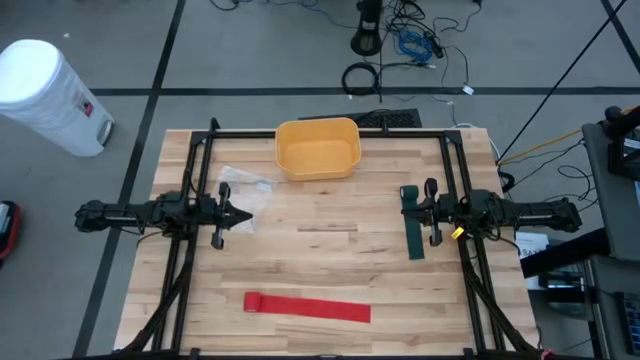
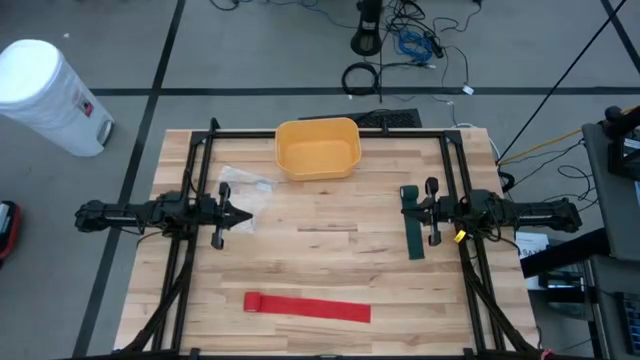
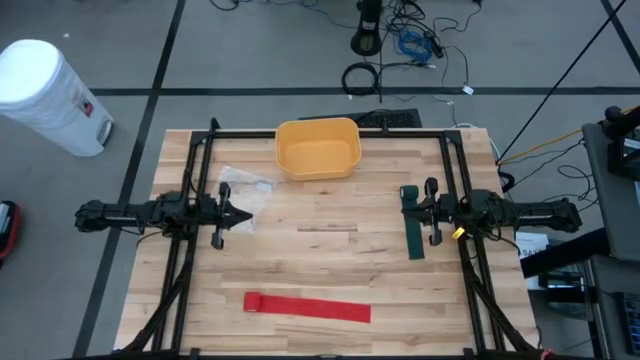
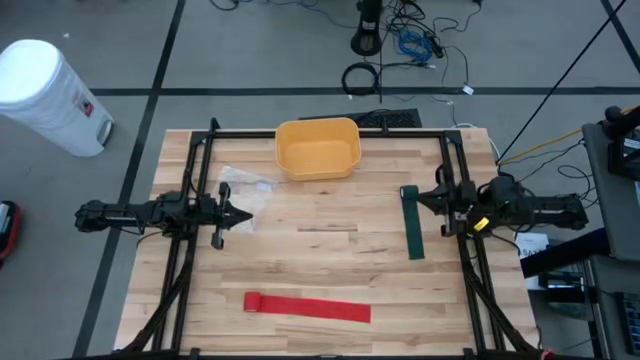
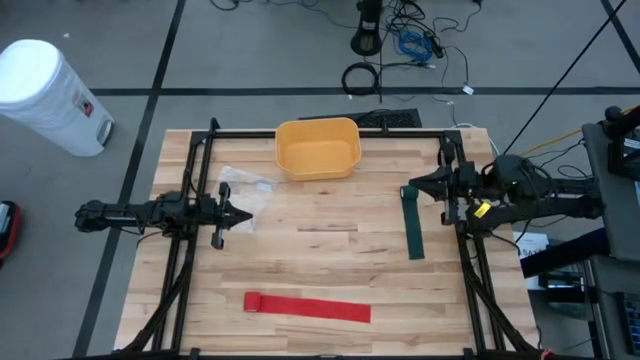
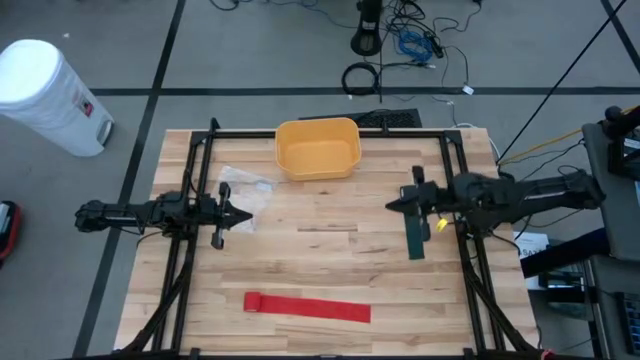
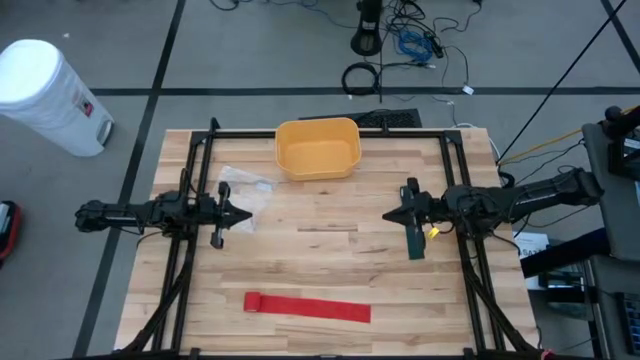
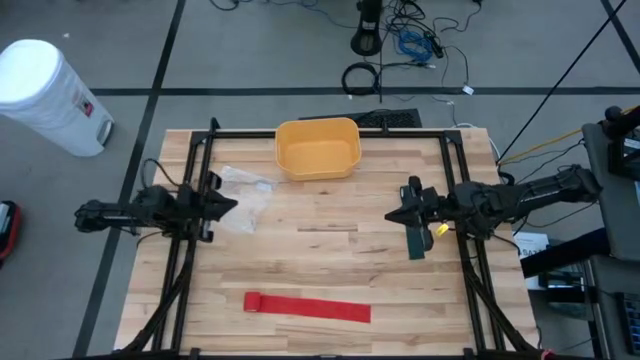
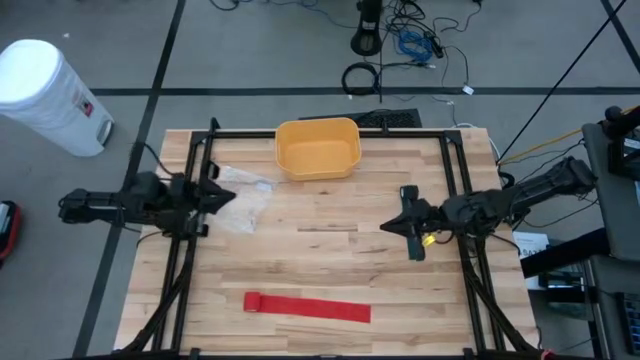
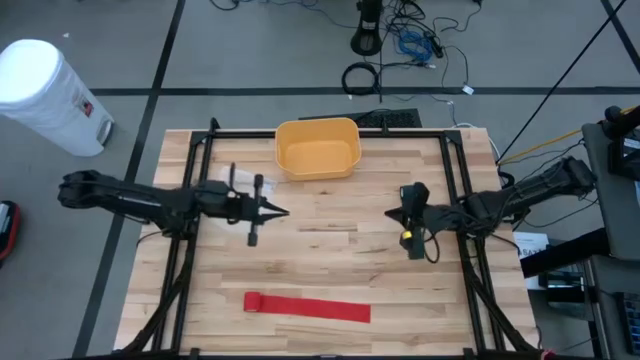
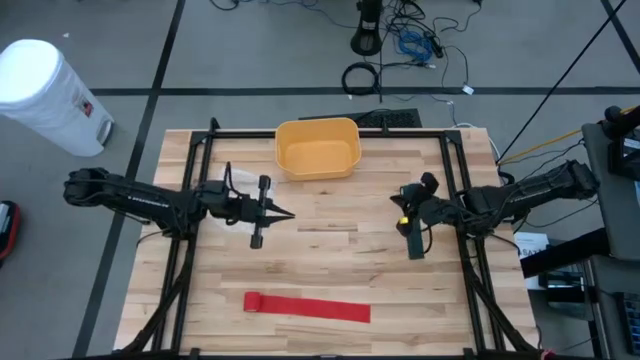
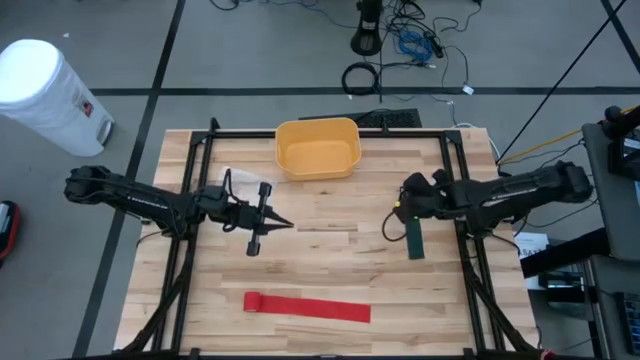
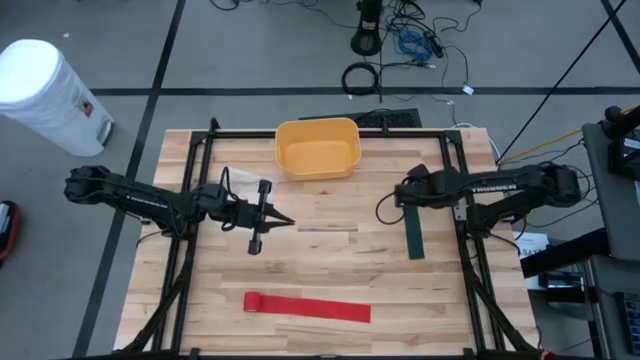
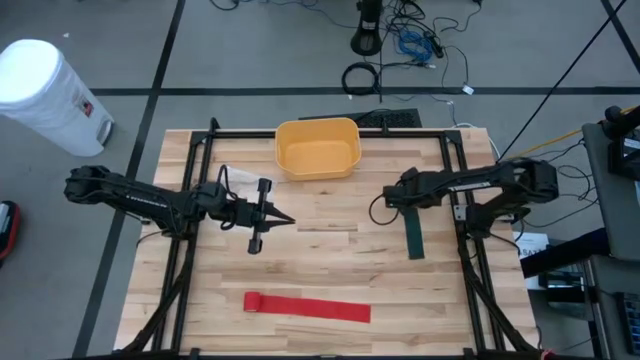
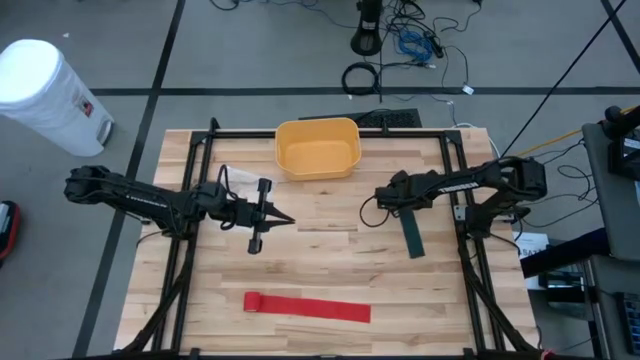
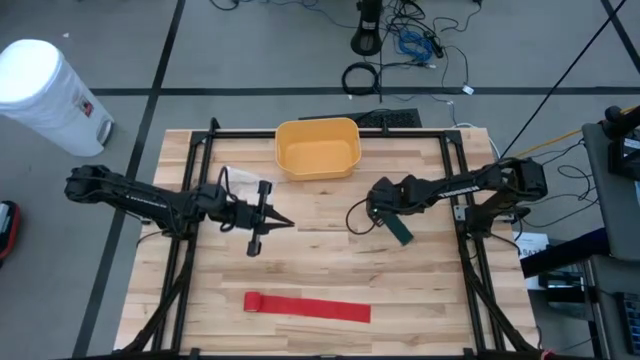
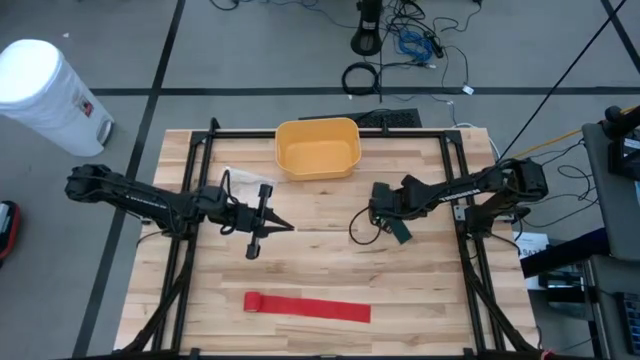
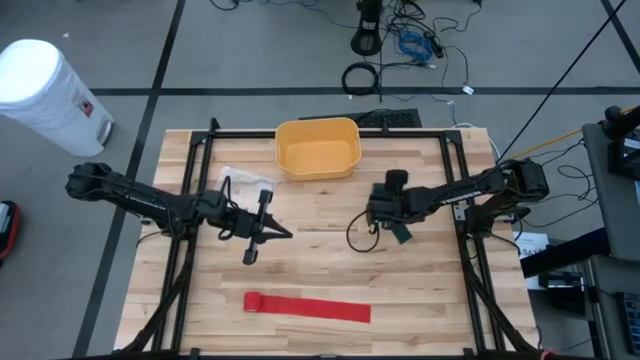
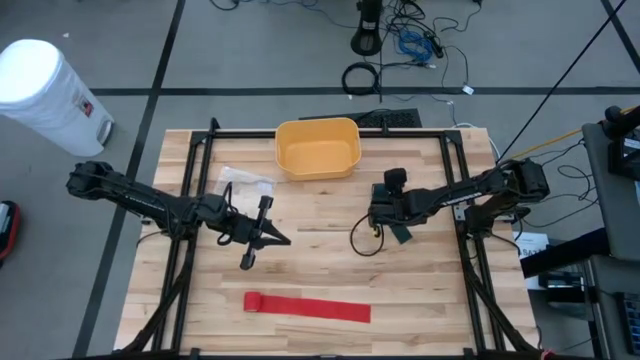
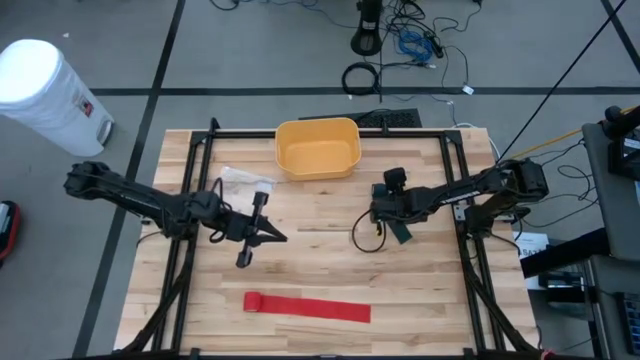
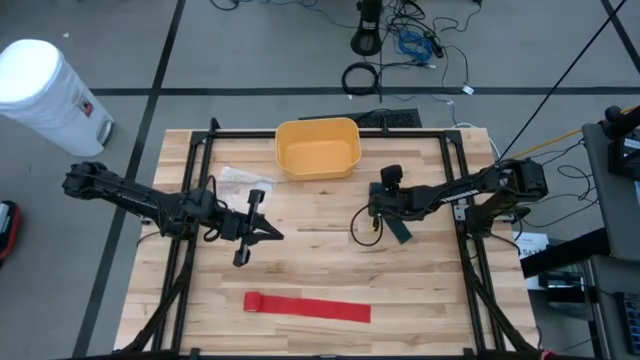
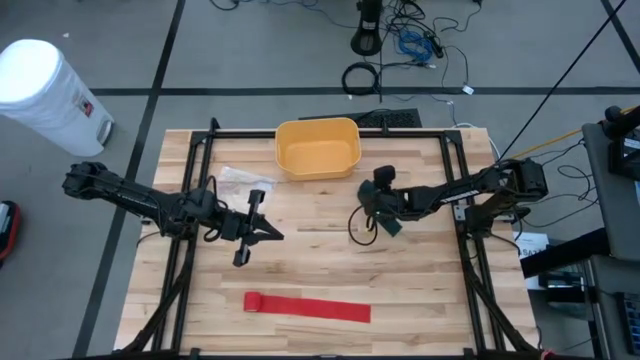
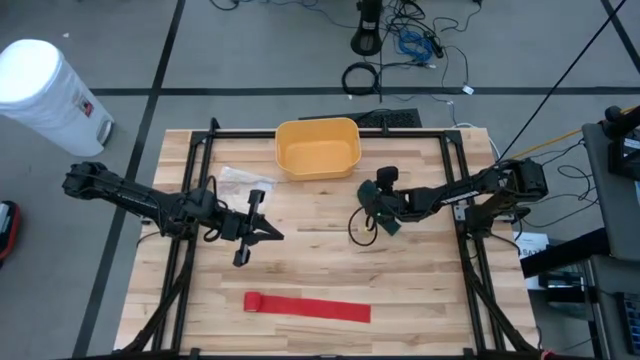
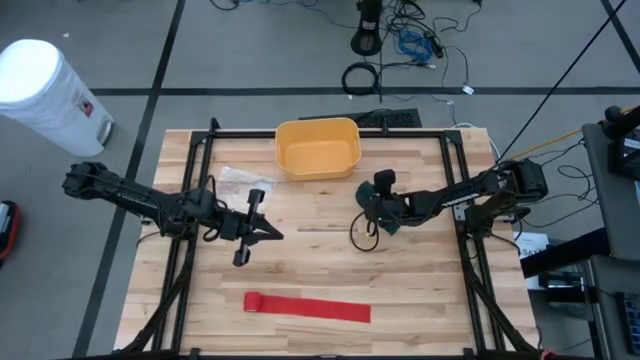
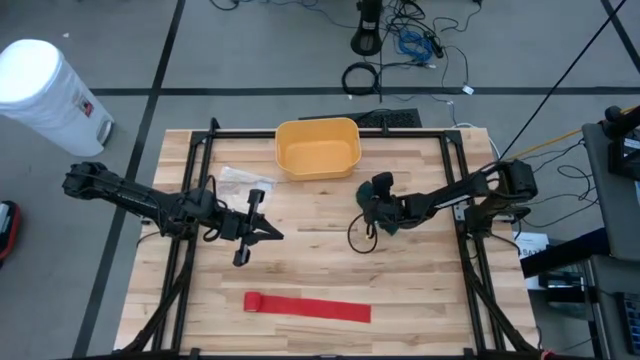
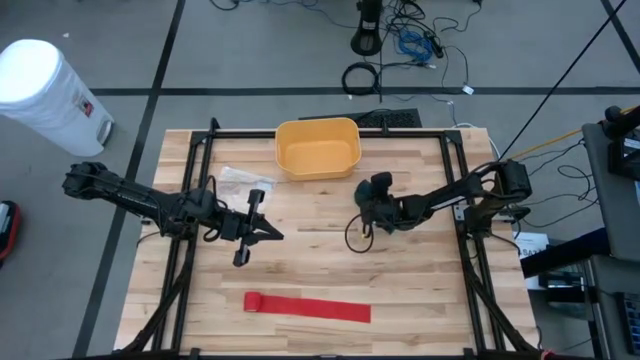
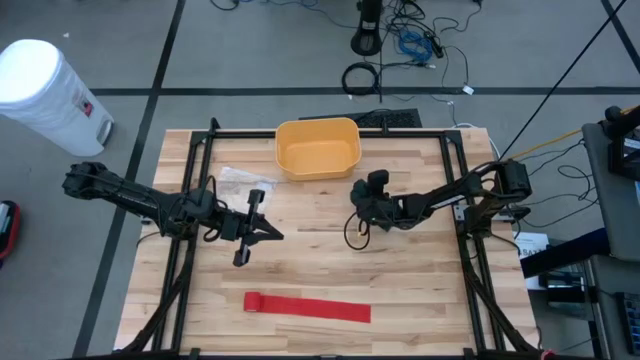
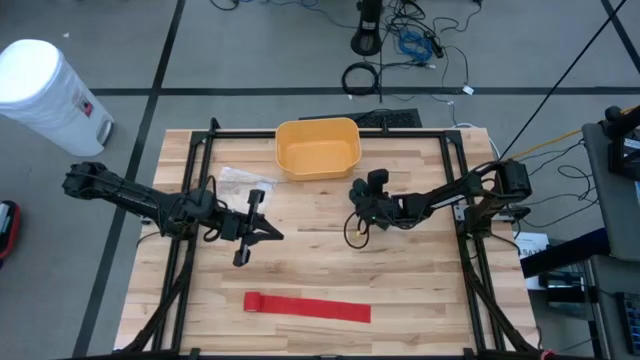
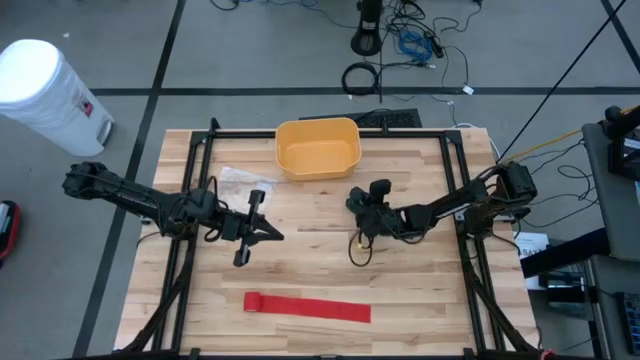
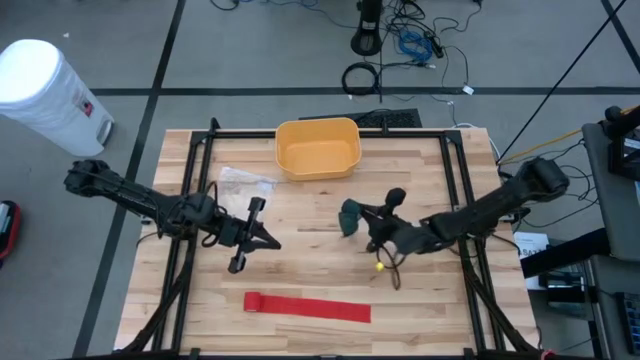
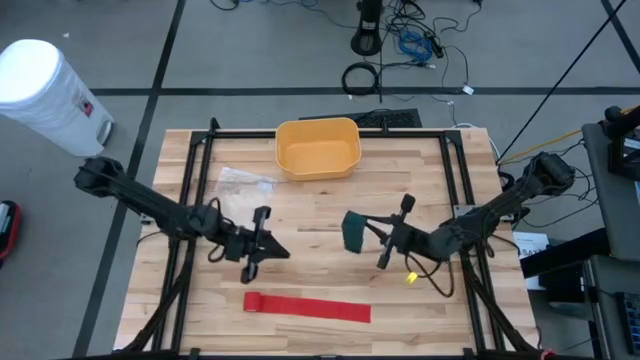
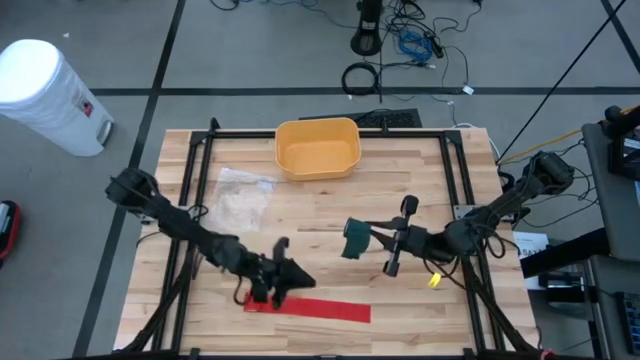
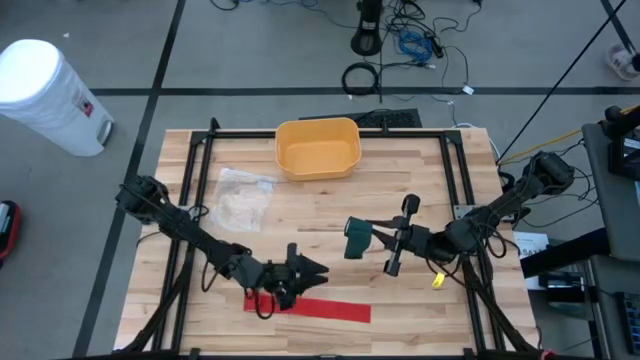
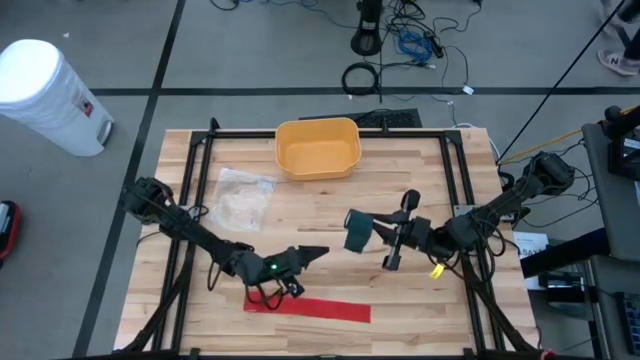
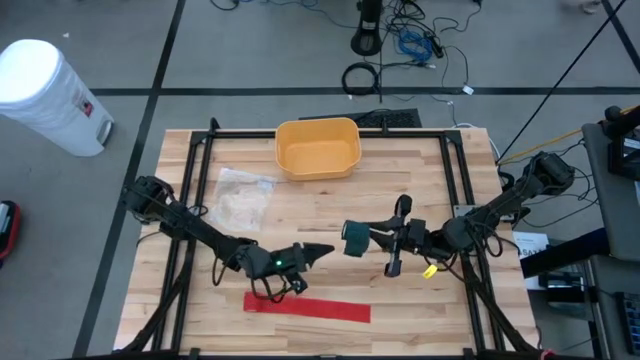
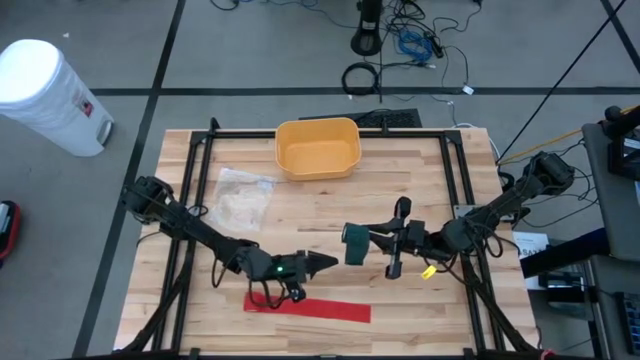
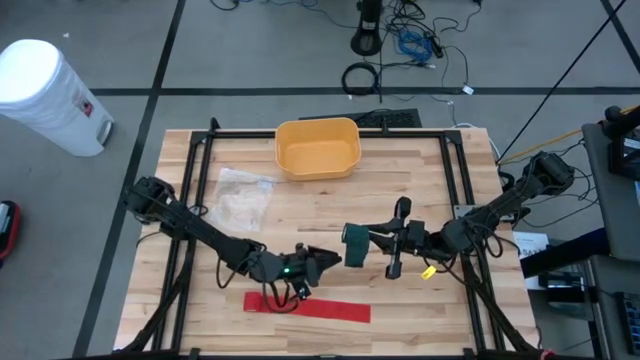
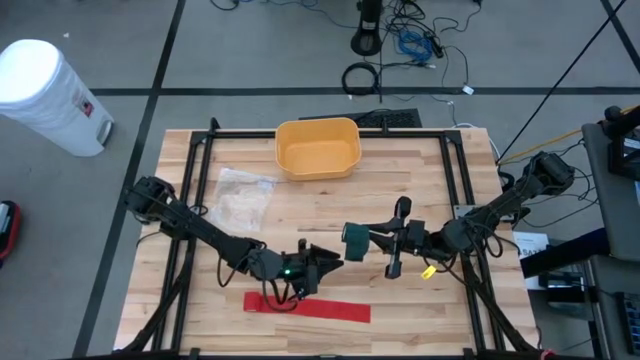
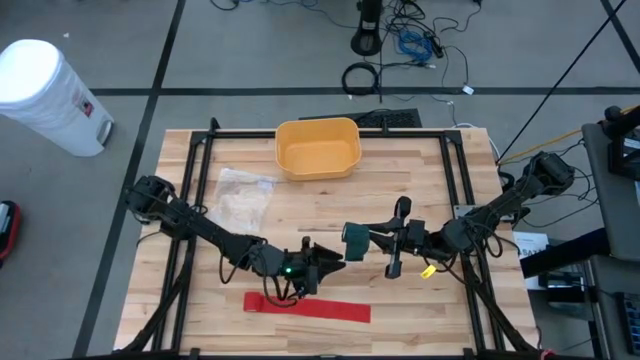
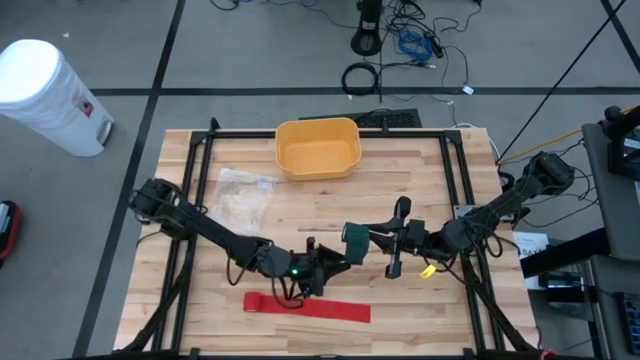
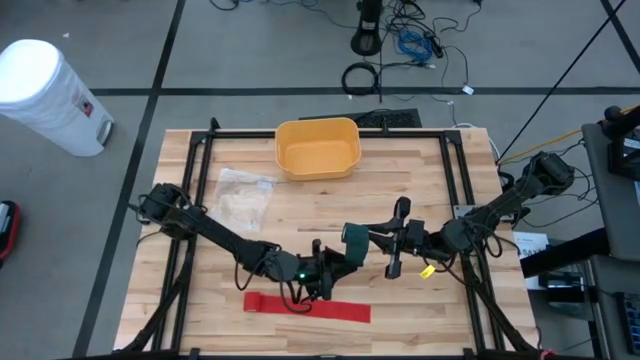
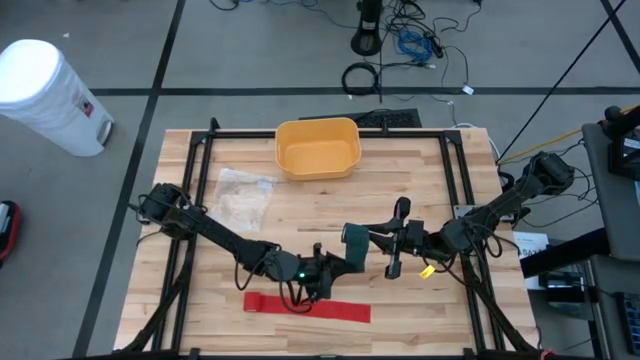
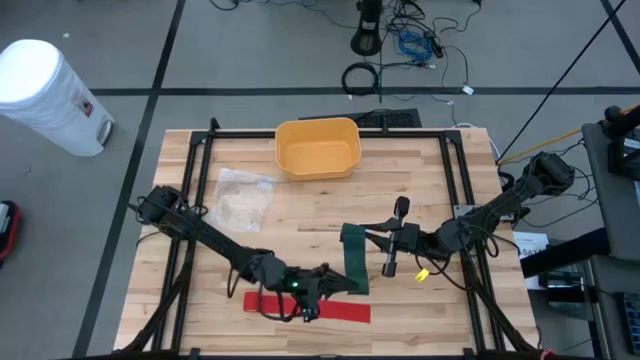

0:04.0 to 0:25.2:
Task: Roll bandage
Roll the green bandage
